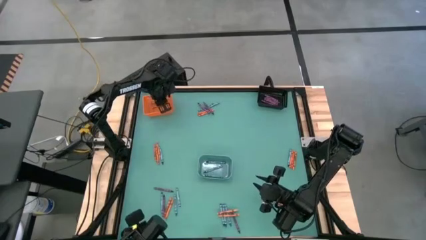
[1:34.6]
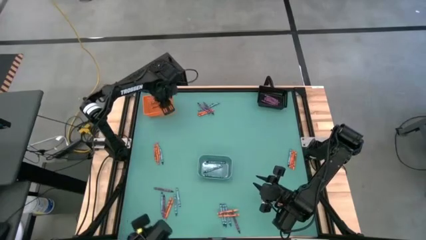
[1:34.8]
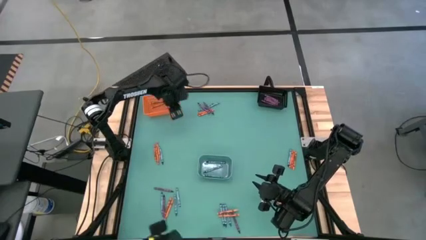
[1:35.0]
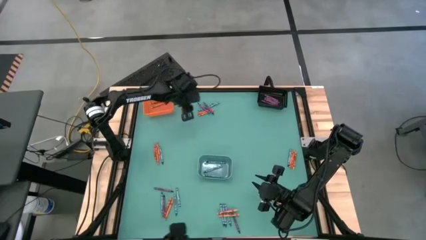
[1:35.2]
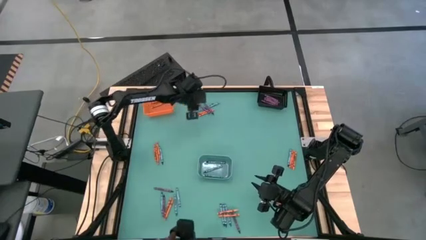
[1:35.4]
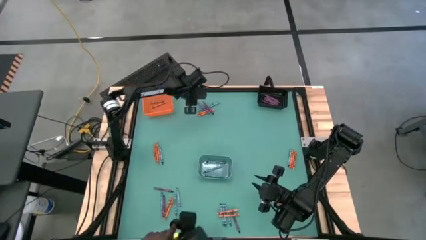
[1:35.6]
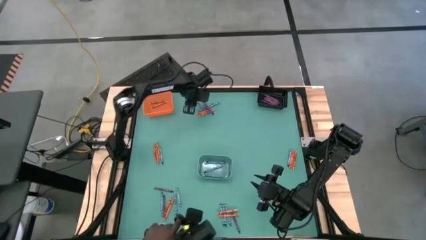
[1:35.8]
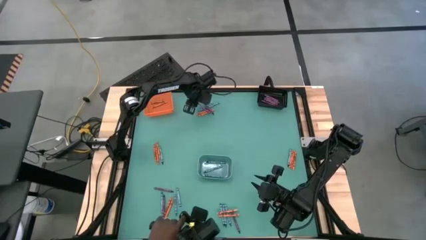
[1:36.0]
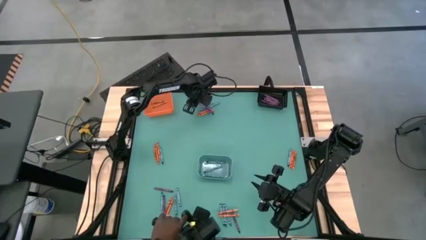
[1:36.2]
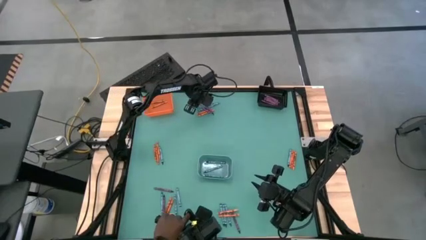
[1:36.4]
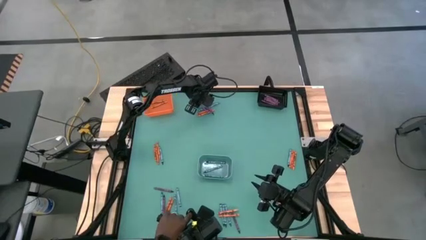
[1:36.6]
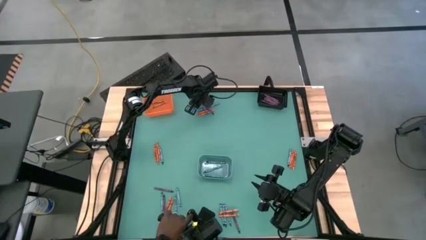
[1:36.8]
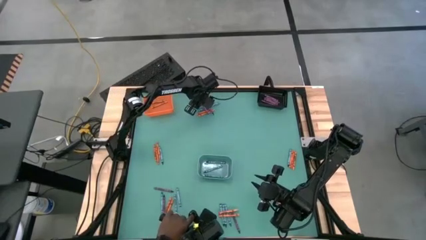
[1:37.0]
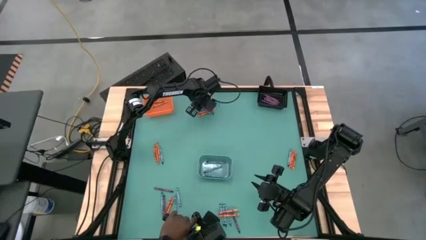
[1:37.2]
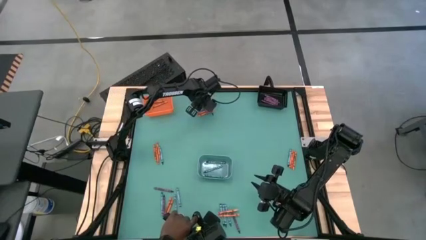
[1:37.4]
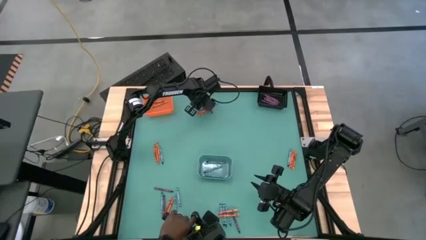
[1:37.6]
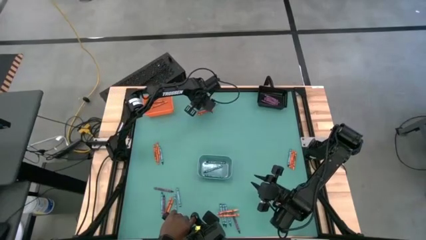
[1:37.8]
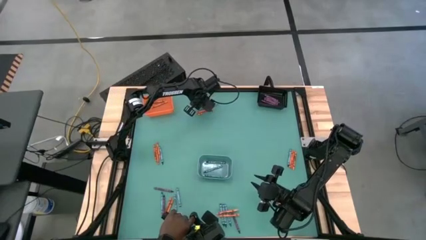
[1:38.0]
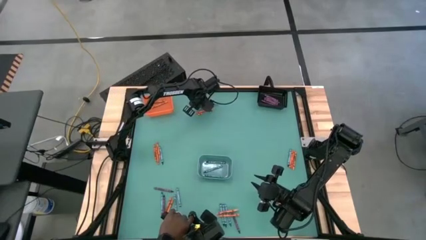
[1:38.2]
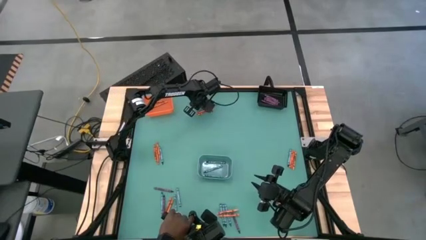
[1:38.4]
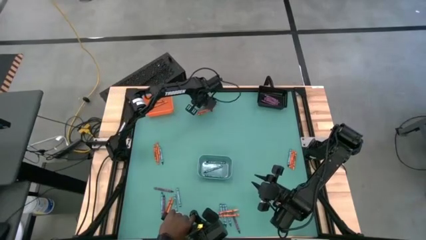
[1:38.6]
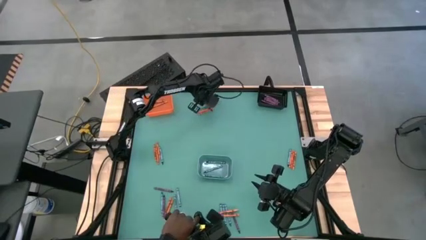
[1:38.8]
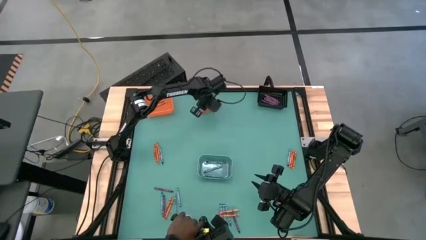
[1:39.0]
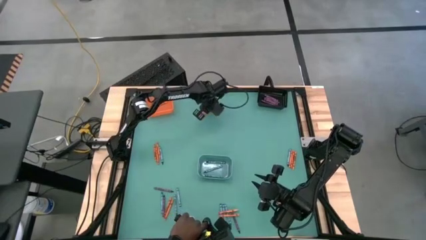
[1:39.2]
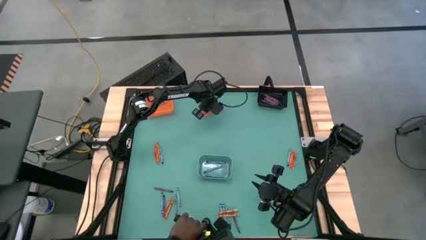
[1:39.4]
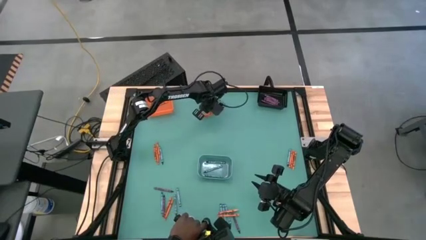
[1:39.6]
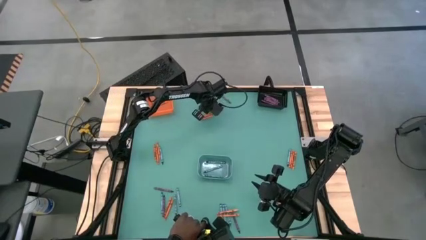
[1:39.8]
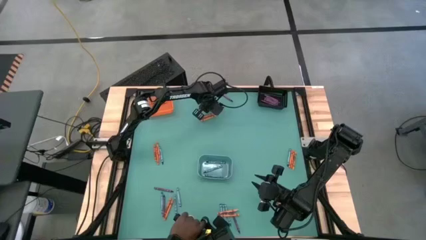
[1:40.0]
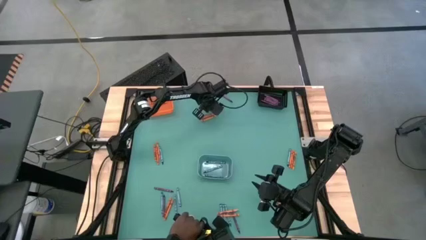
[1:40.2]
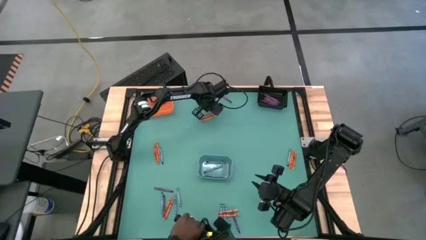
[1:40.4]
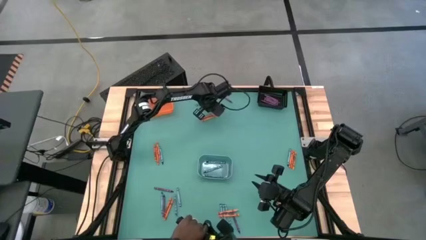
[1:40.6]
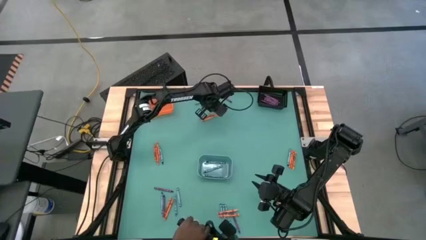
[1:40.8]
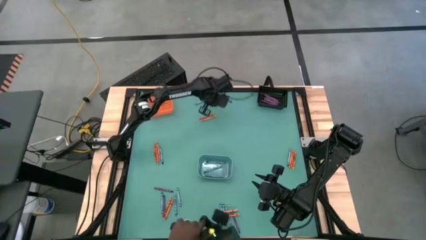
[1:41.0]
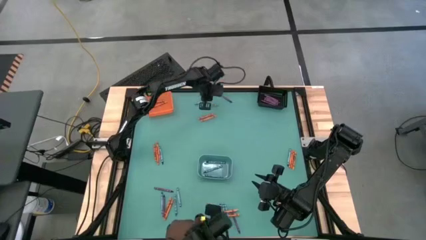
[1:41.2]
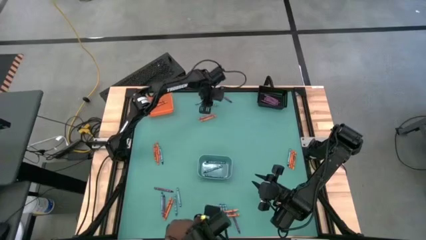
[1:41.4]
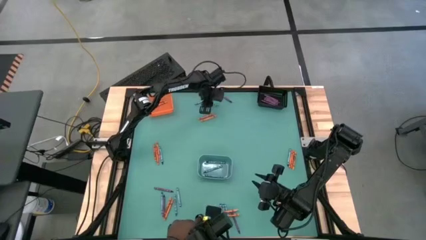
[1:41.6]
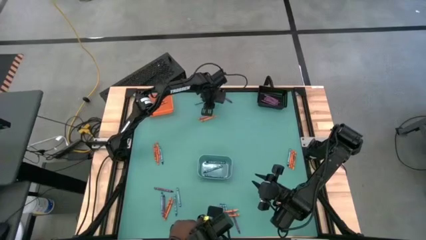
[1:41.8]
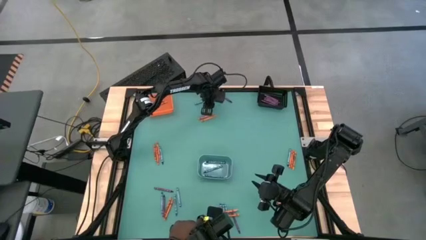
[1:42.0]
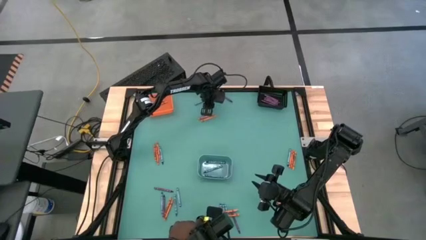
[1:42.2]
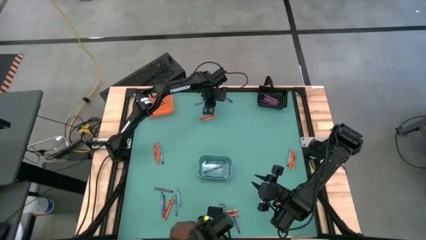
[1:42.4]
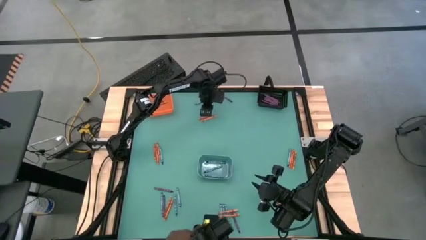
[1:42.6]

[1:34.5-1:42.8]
Task: Sort crayons
Put the violet crayon into the black bin

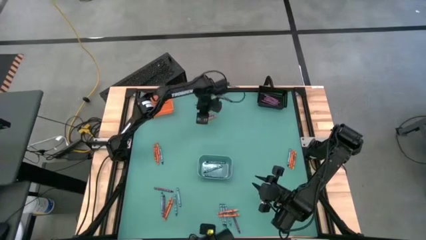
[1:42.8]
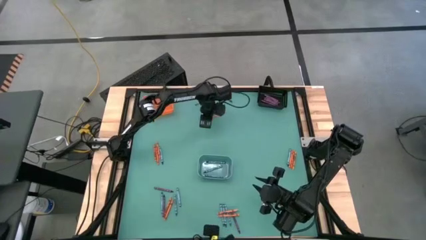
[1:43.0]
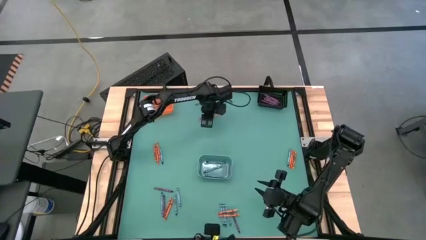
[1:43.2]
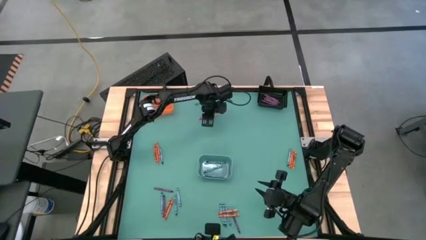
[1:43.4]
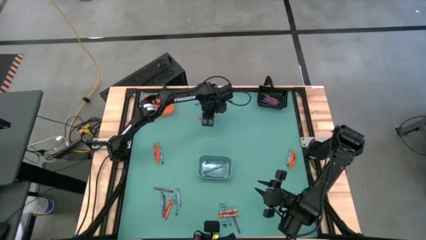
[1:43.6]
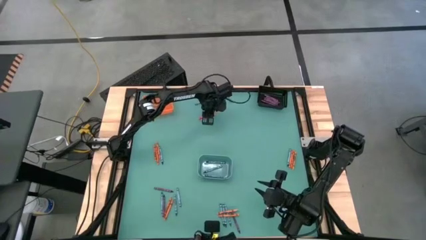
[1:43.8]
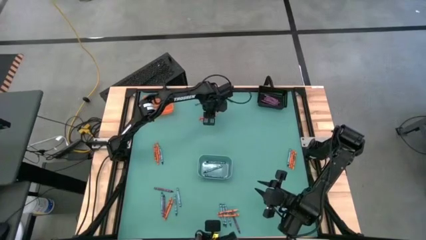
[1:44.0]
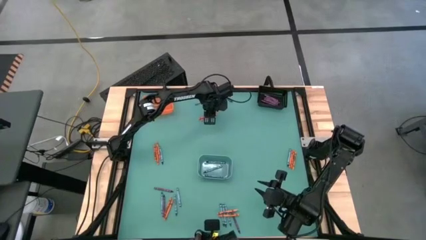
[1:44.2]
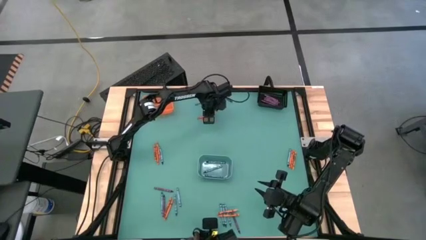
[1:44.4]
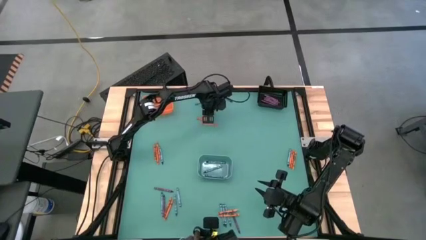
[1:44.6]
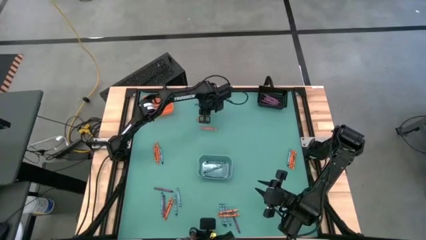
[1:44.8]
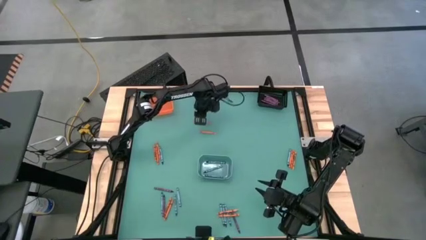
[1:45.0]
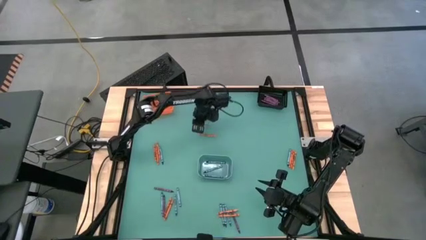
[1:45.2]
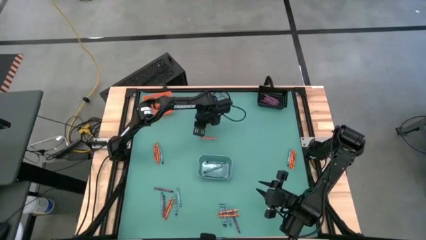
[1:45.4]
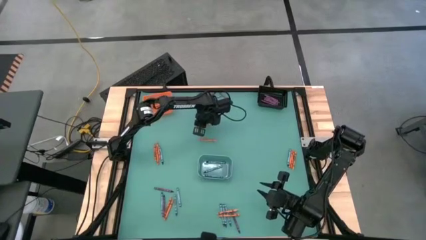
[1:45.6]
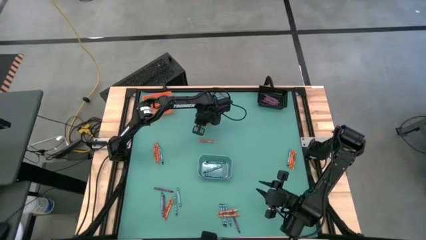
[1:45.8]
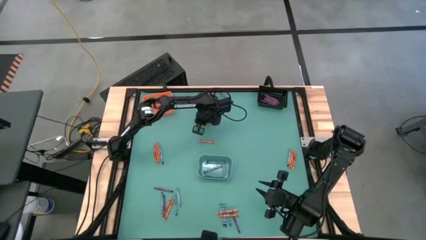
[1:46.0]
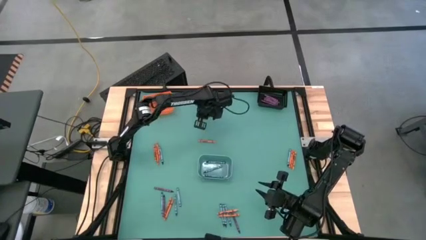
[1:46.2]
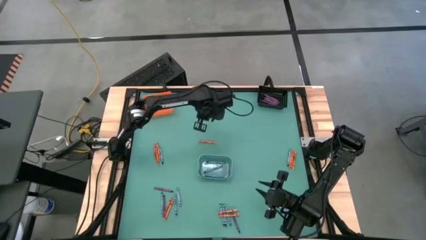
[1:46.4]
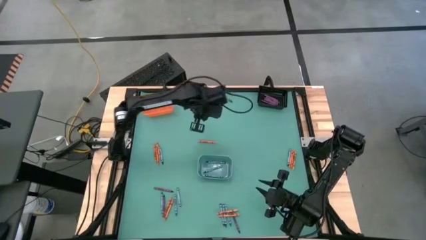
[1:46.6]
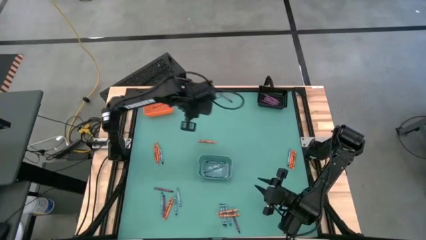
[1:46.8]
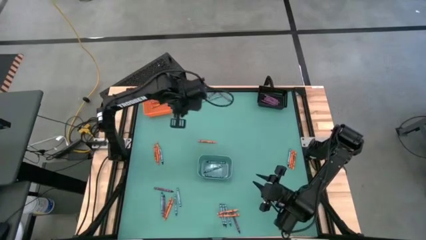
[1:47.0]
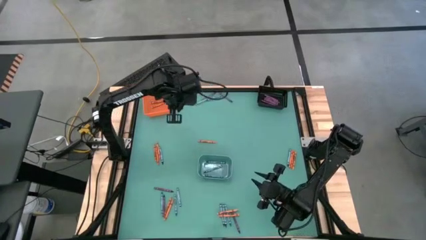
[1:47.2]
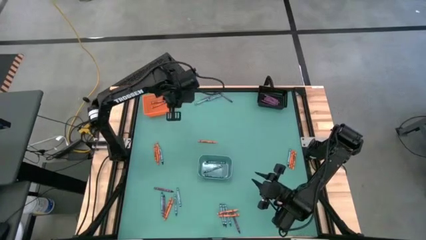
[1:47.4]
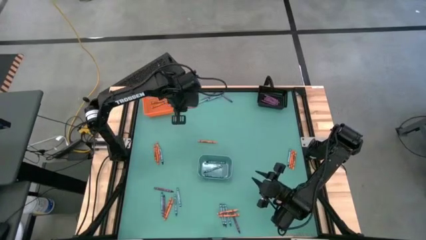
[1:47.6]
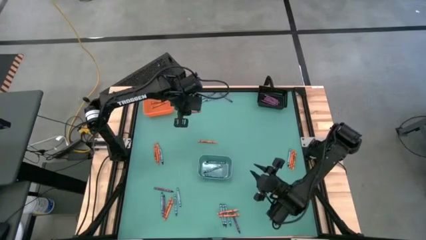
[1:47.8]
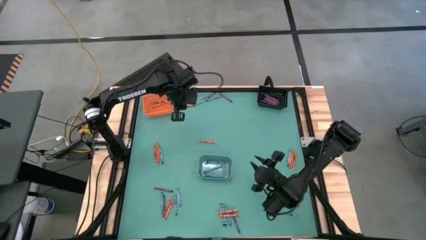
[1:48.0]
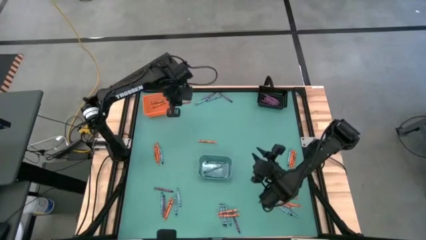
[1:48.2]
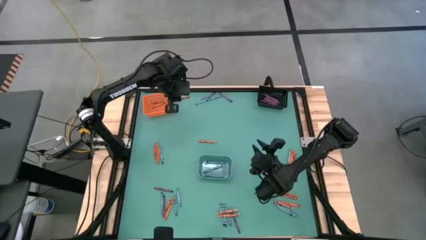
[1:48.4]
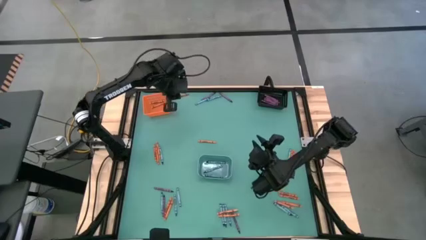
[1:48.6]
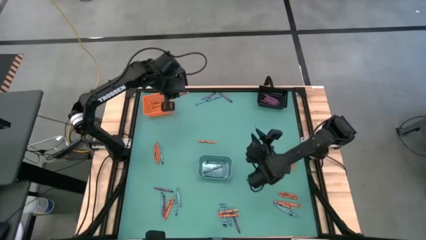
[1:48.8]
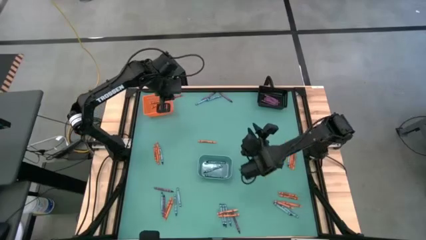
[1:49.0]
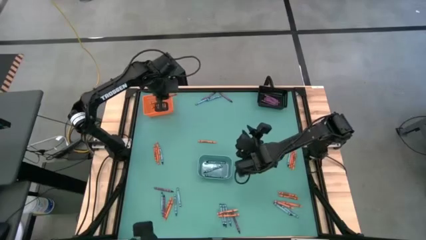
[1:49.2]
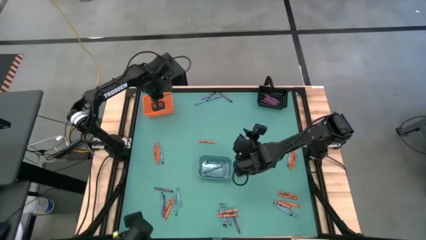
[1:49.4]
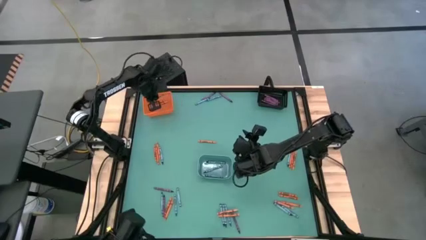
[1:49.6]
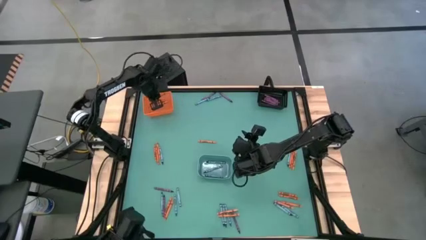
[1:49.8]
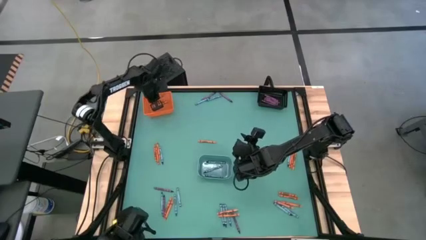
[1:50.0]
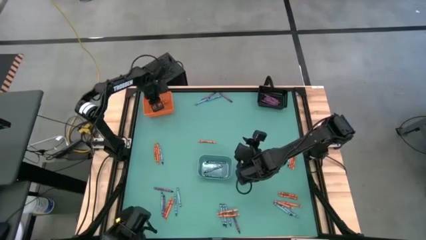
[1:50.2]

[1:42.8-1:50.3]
Put the orange crayon into the orange bin

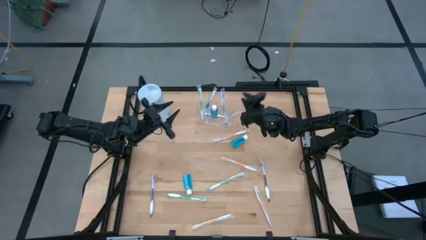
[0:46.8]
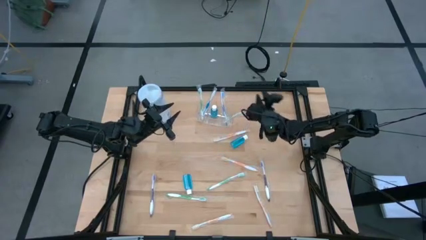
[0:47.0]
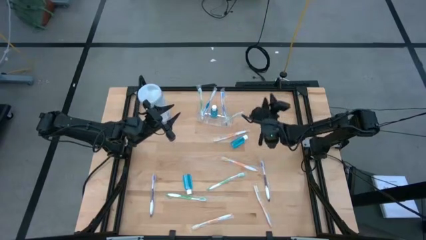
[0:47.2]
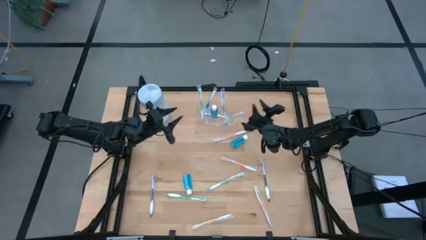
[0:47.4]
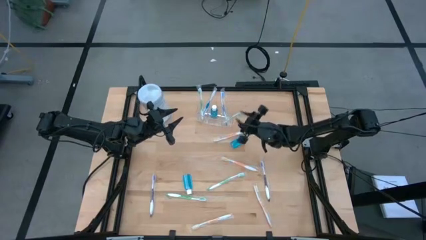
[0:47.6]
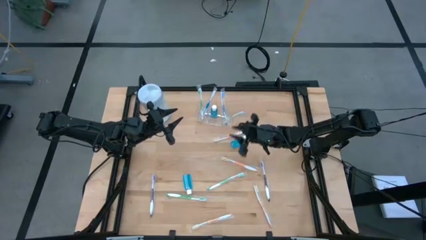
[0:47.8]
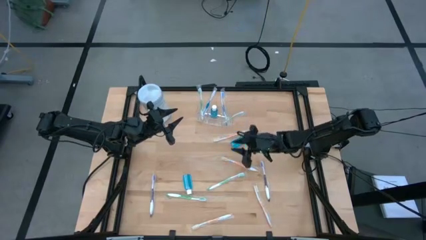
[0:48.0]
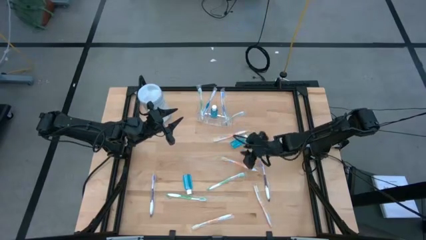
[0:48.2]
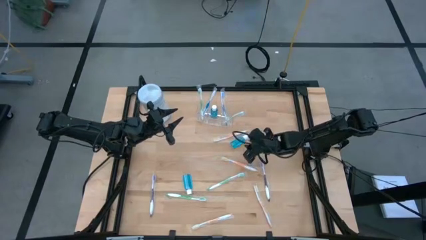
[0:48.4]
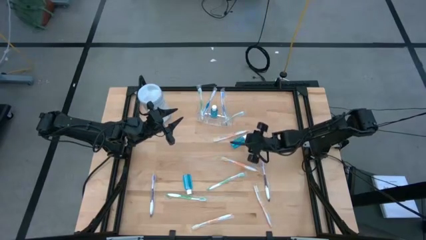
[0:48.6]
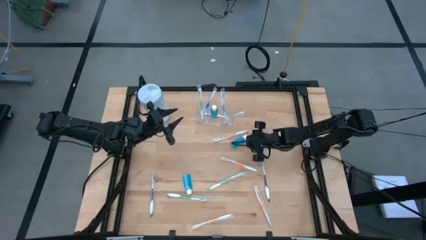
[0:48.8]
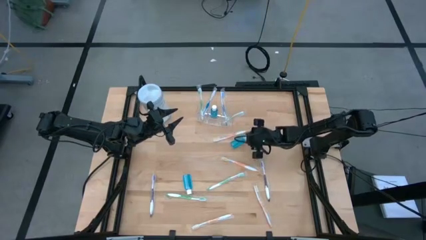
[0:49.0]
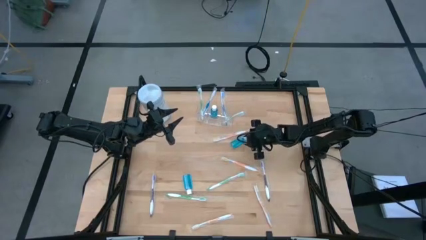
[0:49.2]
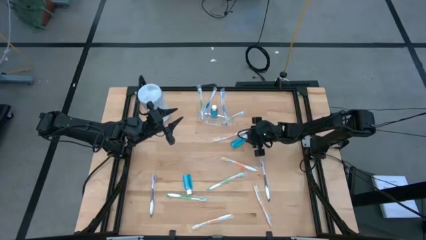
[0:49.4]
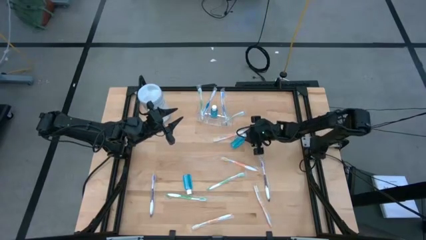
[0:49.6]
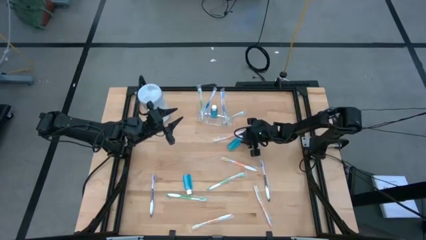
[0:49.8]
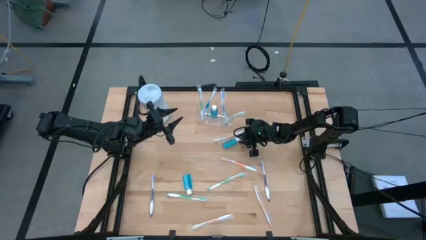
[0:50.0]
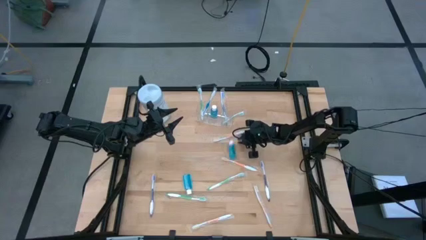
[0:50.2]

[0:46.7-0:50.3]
Task: Pick & Place toothbrushing station
Put the mouthwash into the transparent organizer
